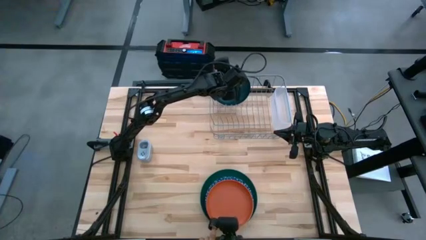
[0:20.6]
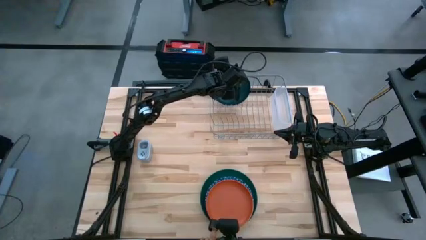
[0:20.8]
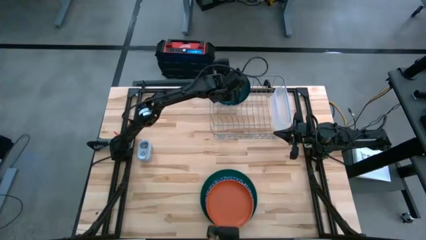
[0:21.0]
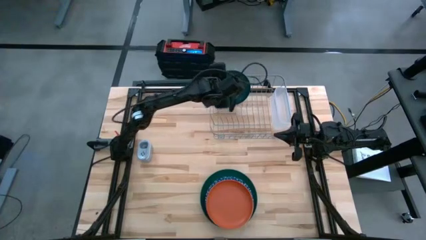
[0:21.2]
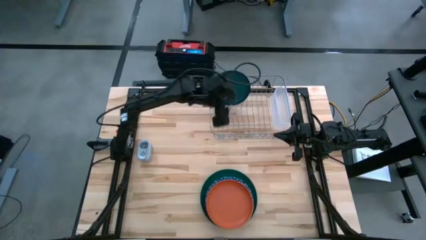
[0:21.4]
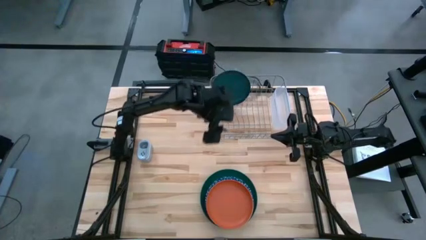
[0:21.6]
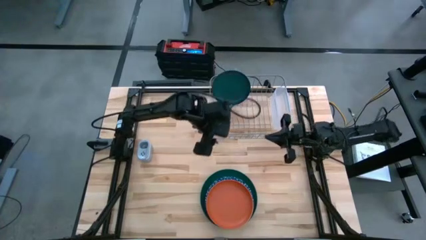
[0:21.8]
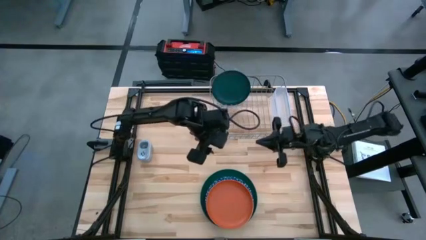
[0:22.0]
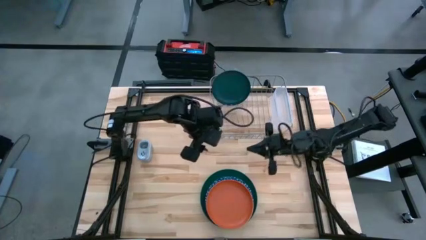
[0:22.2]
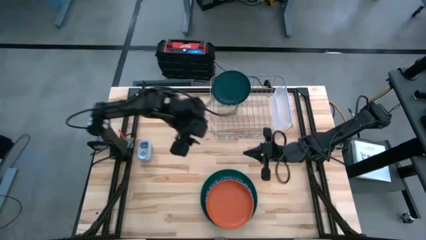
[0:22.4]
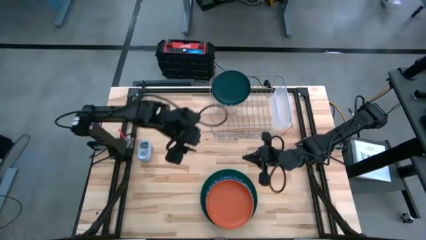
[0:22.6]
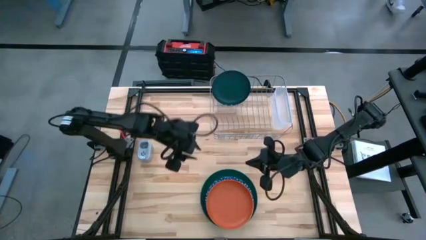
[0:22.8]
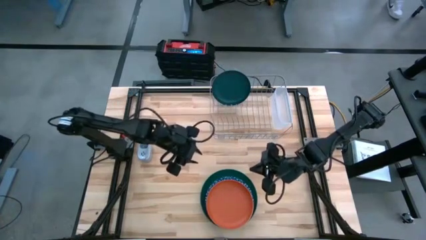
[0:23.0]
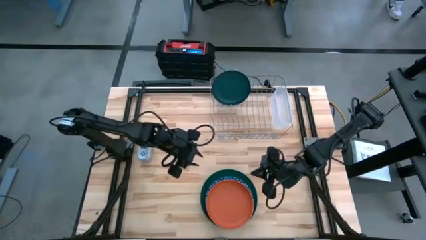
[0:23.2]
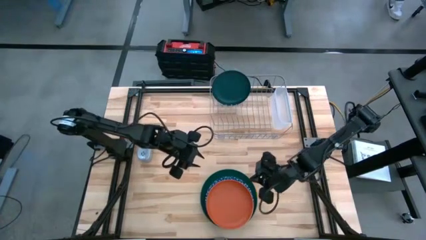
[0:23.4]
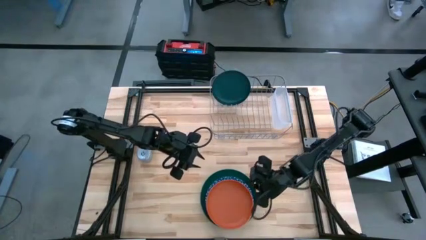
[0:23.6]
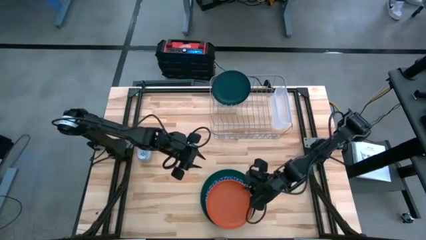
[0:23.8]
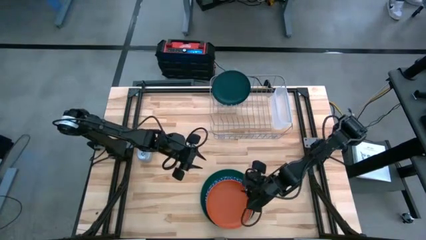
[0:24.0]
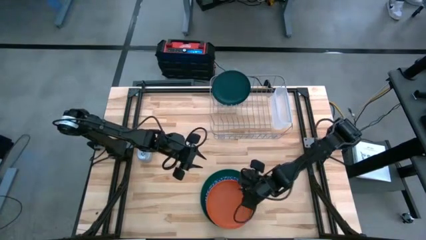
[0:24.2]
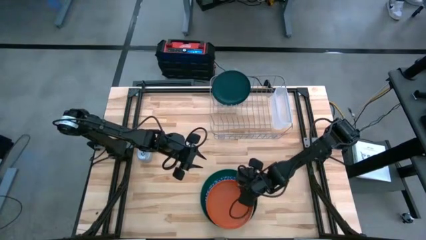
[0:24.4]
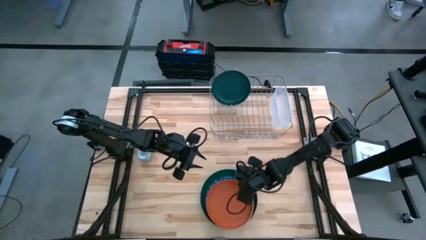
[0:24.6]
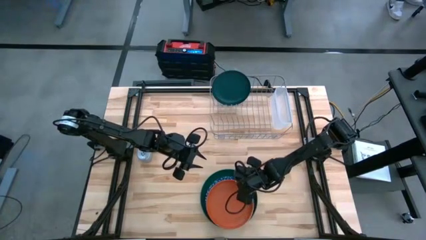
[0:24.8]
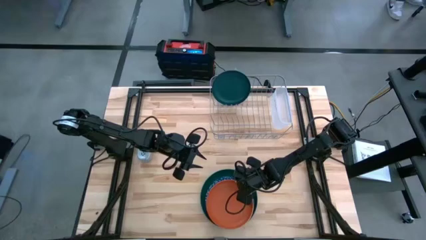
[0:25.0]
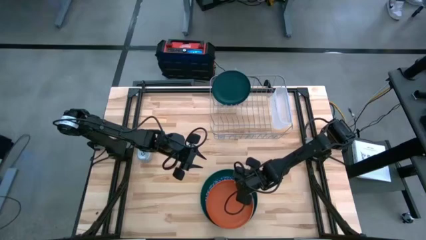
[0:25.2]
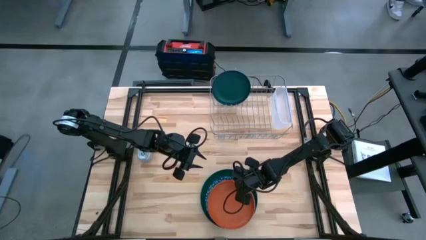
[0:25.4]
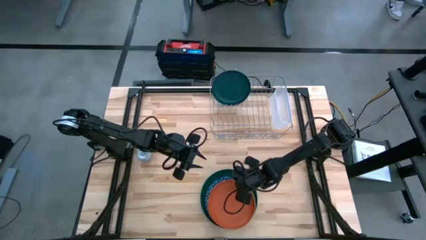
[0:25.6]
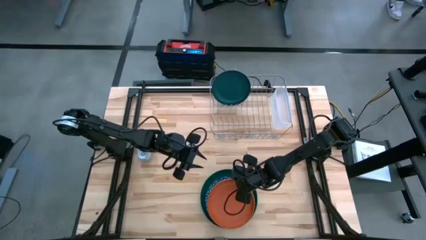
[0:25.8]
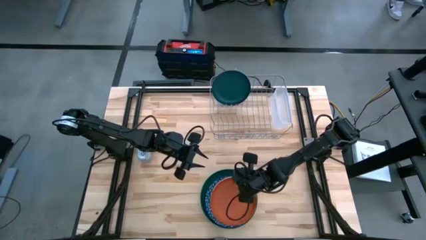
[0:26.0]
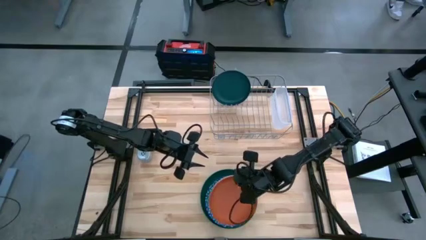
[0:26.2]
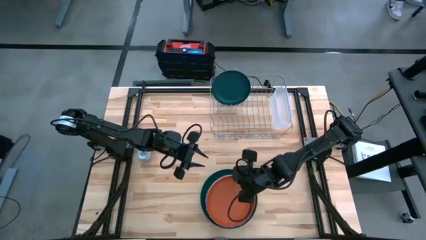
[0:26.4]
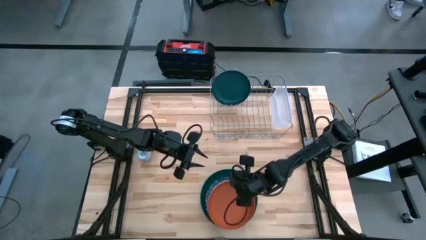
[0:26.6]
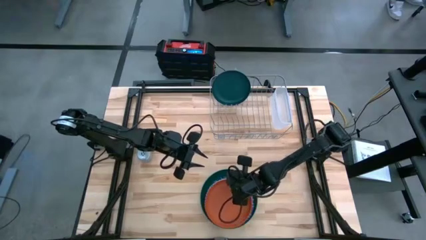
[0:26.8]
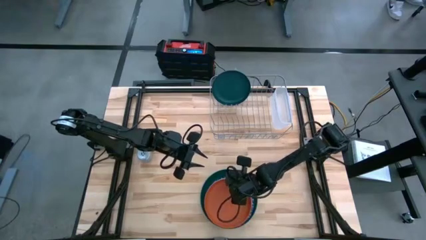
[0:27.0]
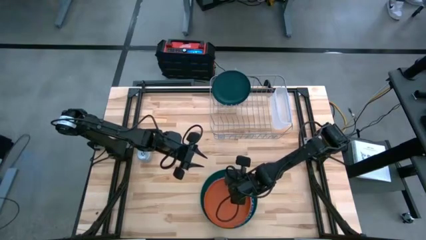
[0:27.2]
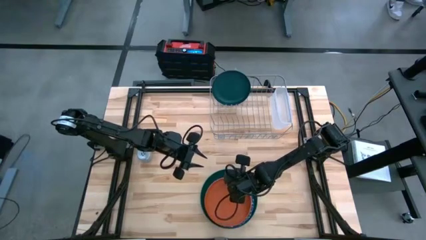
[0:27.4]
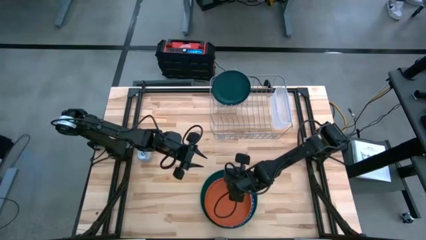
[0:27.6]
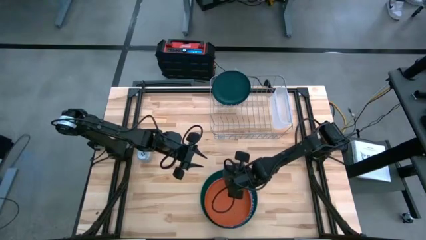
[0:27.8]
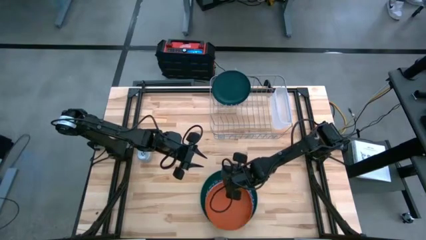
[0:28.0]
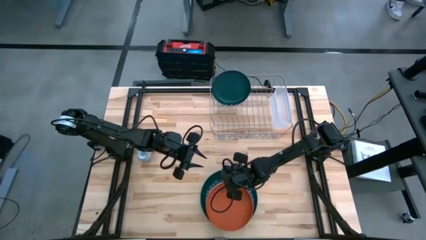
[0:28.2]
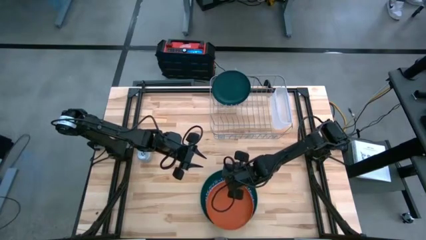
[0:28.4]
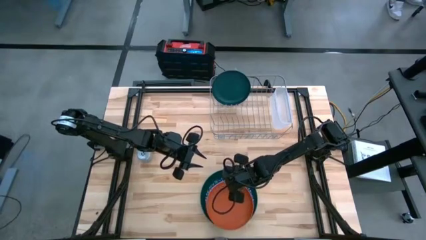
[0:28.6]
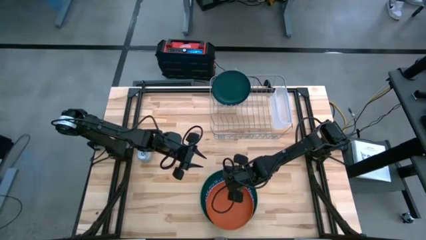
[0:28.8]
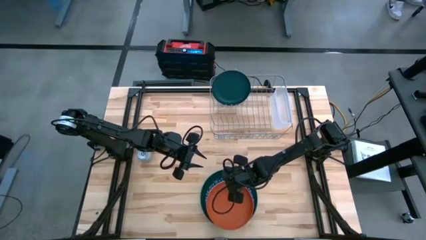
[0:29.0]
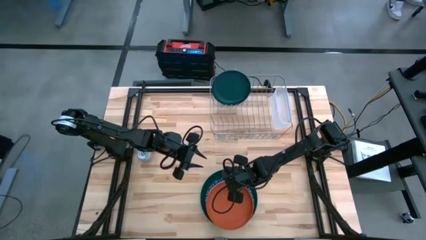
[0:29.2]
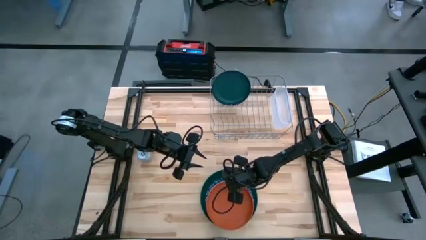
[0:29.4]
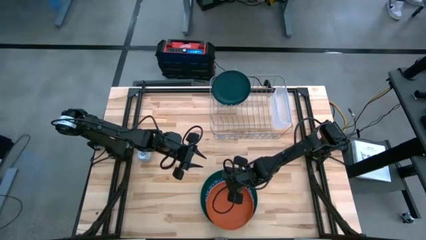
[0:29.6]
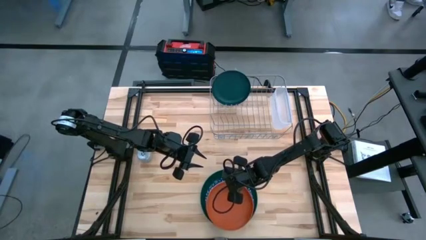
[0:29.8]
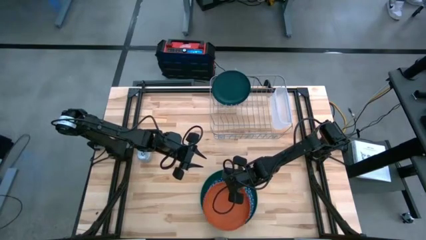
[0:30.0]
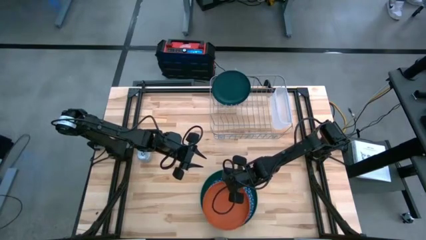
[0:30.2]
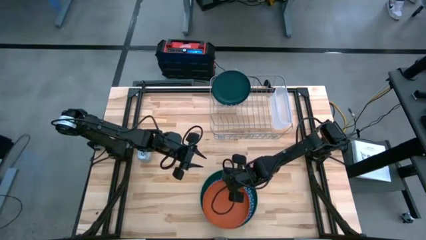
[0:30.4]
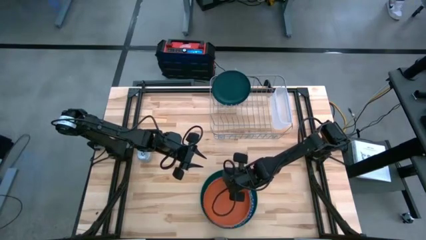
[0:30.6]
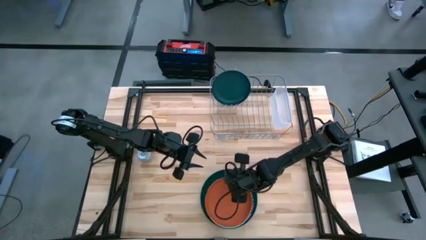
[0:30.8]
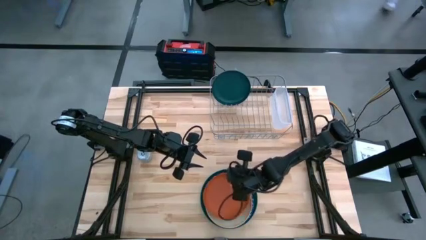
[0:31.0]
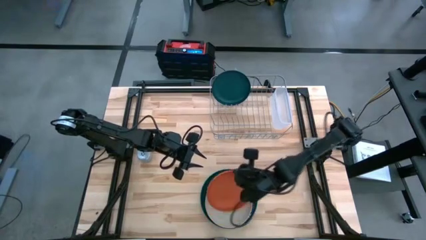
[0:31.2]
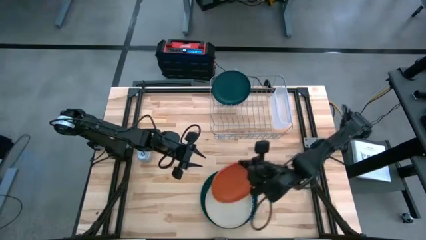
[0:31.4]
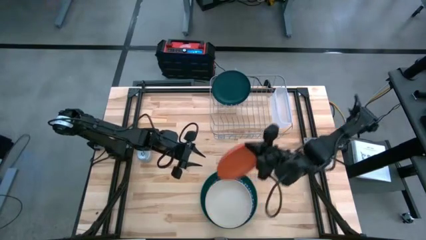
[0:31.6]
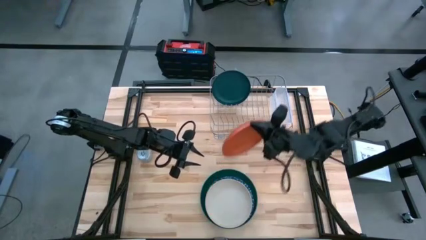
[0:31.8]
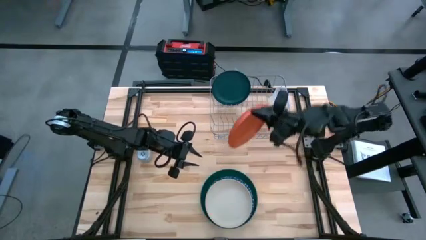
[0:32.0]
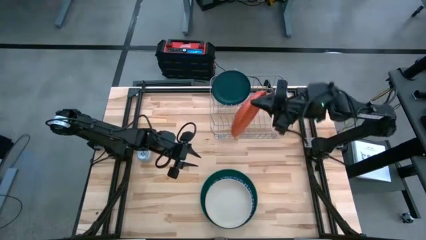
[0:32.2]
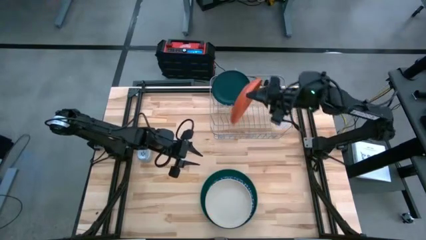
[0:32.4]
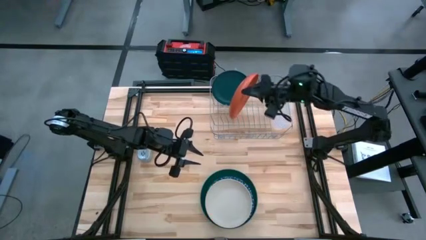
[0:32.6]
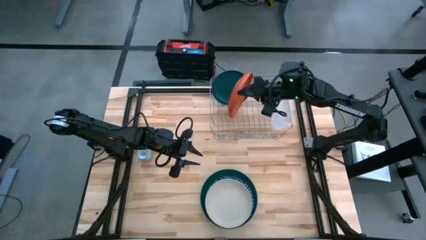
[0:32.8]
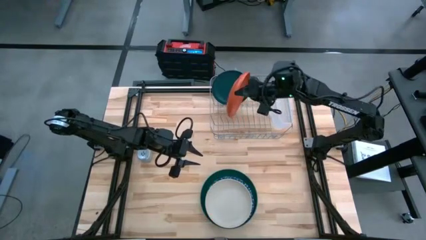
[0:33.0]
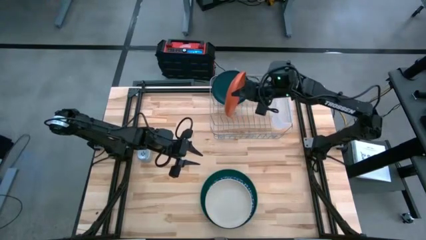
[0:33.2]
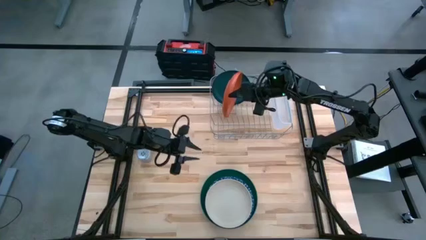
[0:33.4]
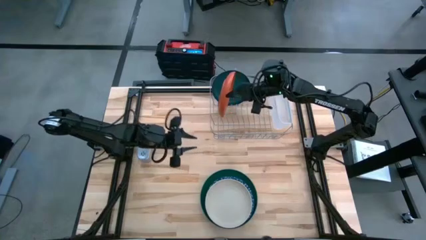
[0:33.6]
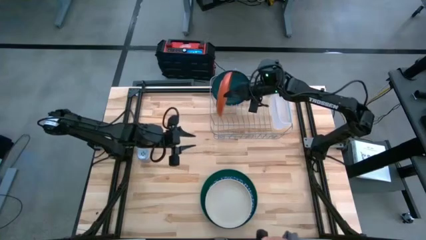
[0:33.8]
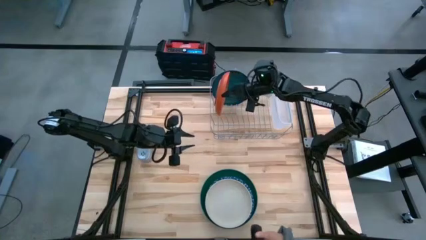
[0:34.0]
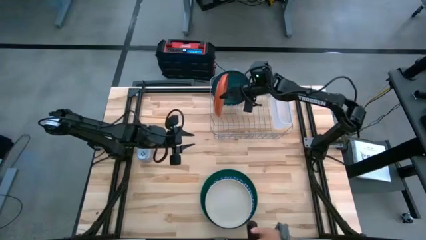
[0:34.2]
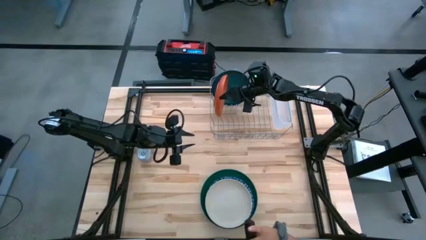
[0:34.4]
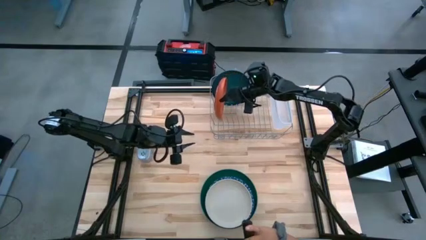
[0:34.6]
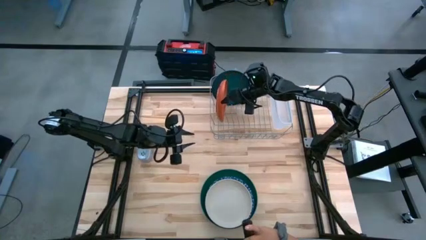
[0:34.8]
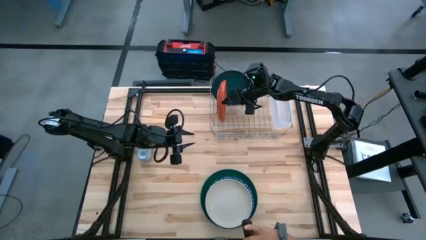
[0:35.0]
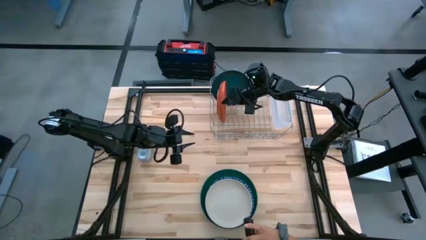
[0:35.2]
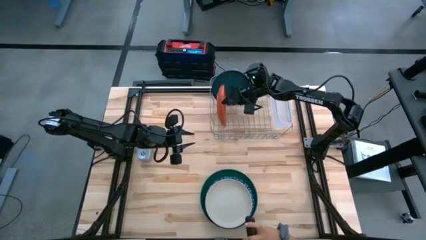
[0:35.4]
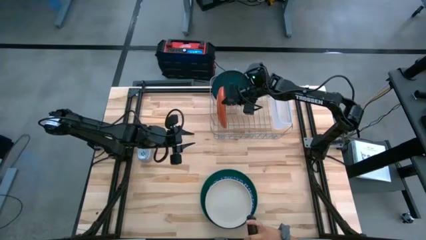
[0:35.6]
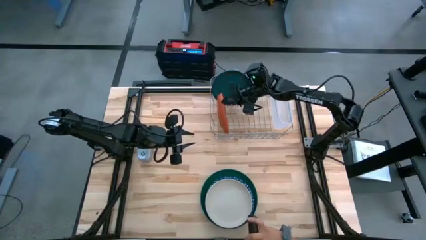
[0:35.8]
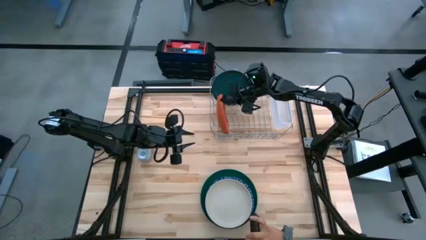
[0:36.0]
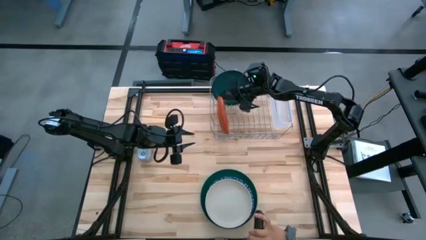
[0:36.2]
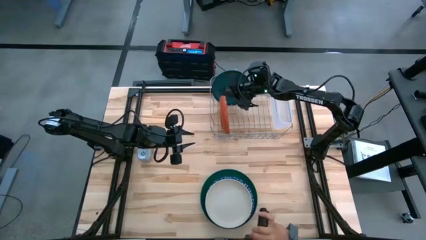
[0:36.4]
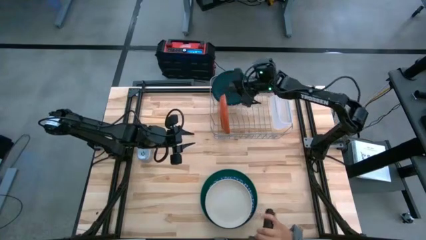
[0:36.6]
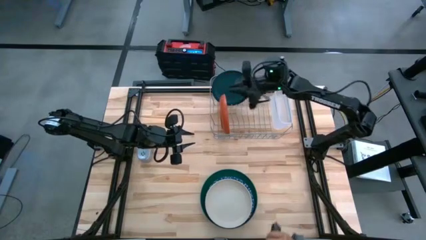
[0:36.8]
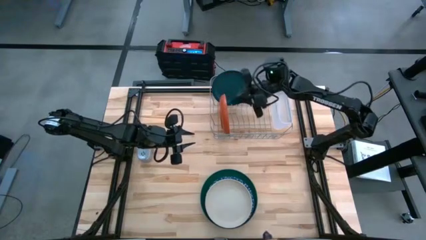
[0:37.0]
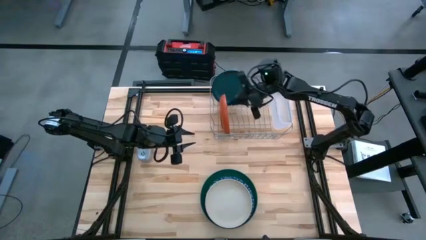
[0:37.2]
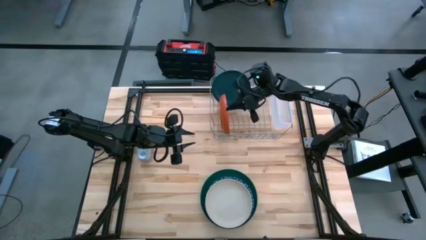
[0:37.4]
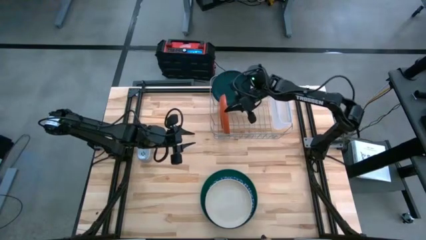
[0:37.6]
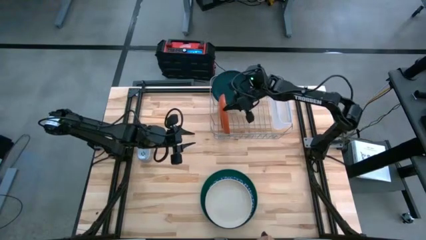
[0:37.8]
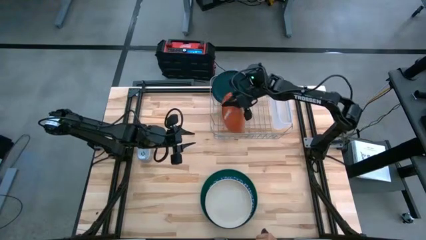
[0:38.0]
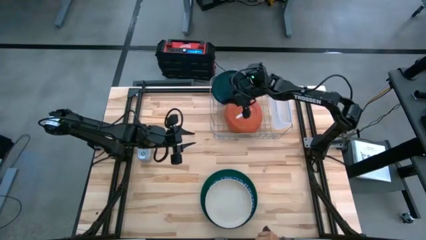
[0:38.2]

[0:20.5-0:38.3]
Task: Sort dishes
Put the orange plate in the dish rack
